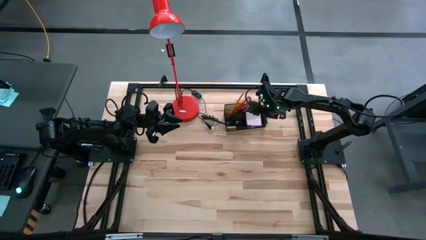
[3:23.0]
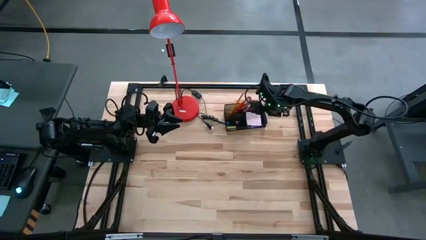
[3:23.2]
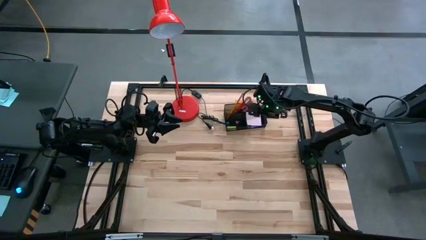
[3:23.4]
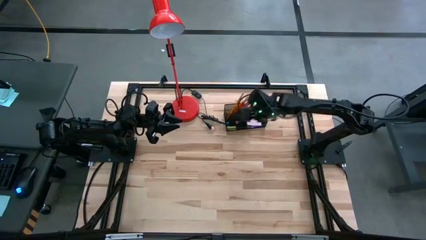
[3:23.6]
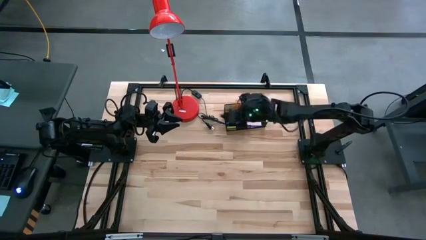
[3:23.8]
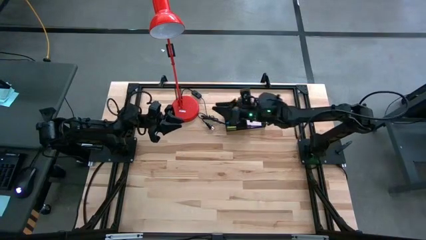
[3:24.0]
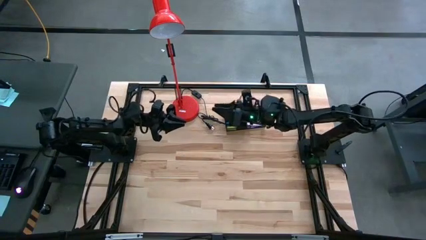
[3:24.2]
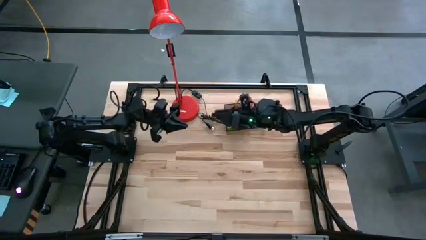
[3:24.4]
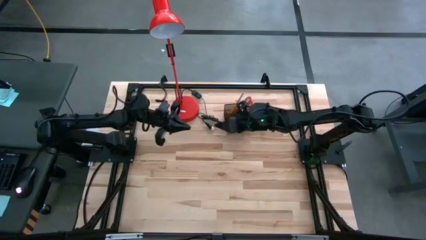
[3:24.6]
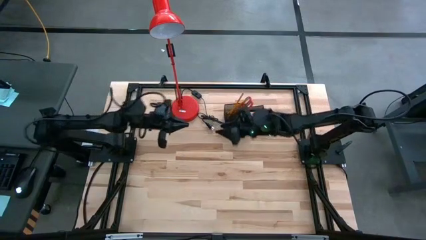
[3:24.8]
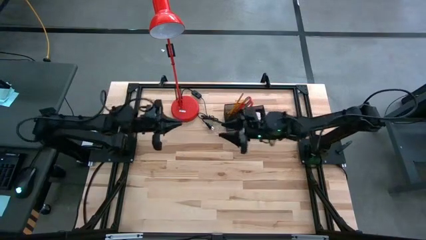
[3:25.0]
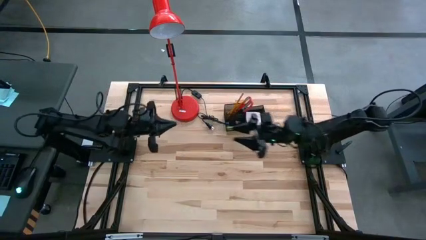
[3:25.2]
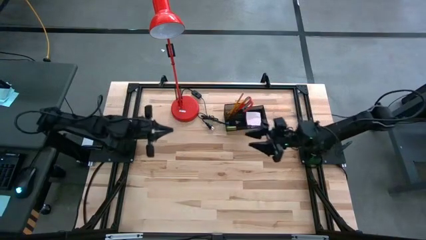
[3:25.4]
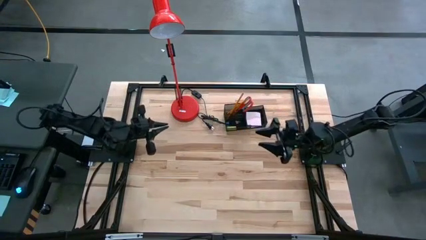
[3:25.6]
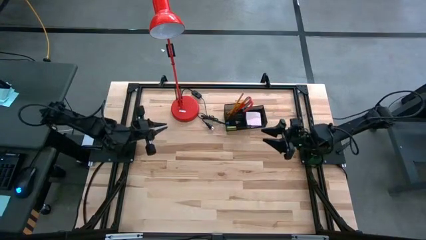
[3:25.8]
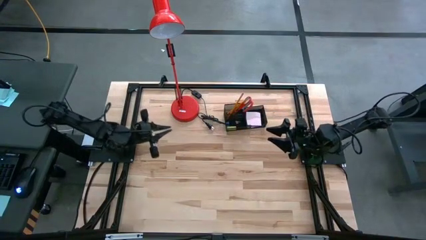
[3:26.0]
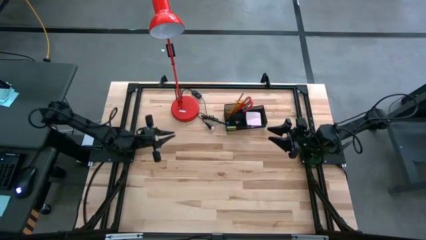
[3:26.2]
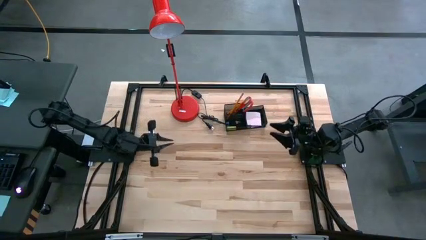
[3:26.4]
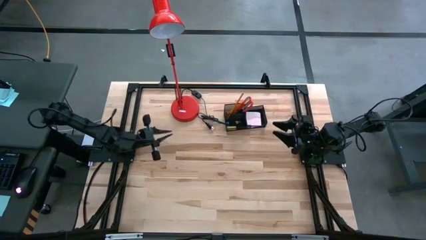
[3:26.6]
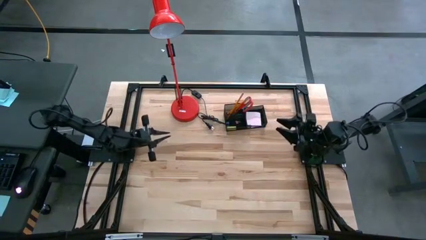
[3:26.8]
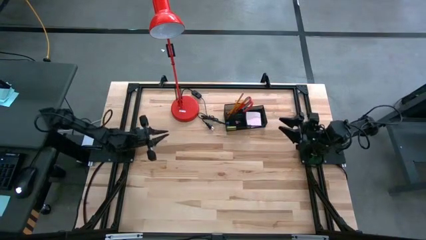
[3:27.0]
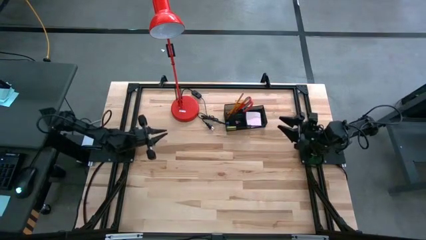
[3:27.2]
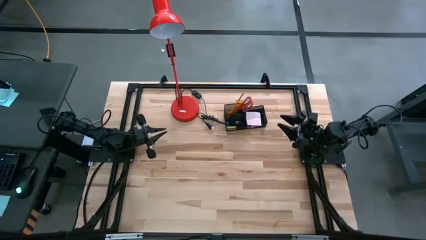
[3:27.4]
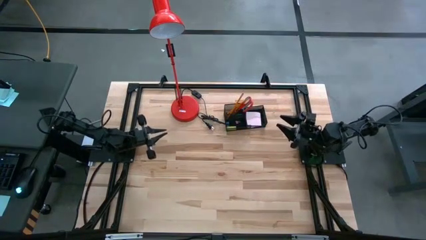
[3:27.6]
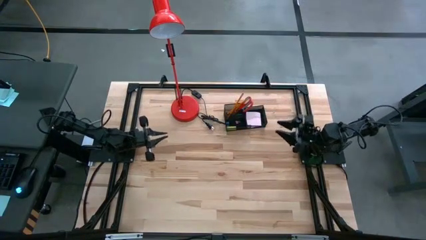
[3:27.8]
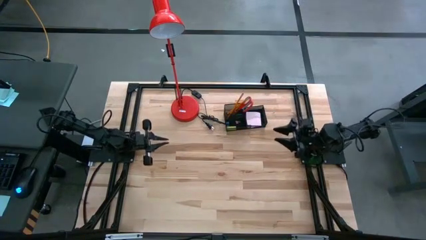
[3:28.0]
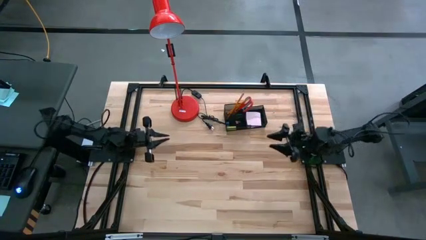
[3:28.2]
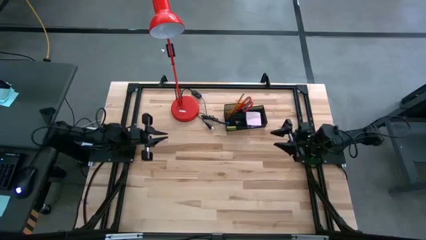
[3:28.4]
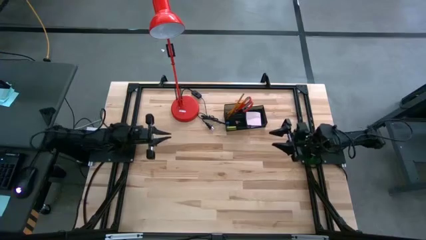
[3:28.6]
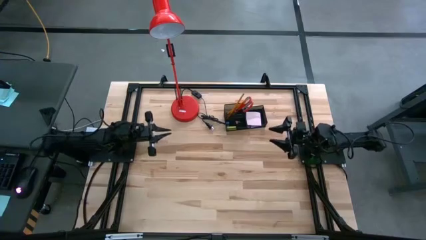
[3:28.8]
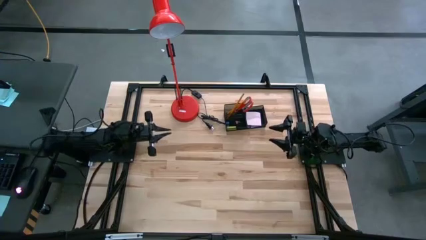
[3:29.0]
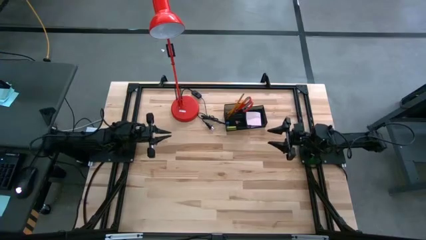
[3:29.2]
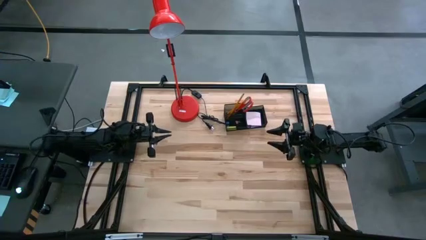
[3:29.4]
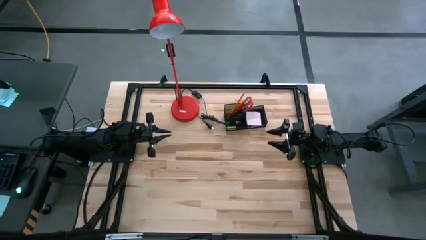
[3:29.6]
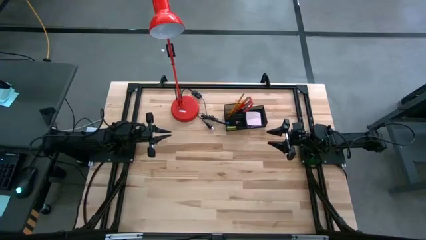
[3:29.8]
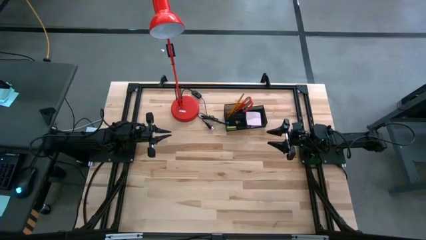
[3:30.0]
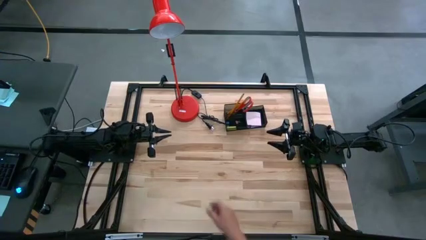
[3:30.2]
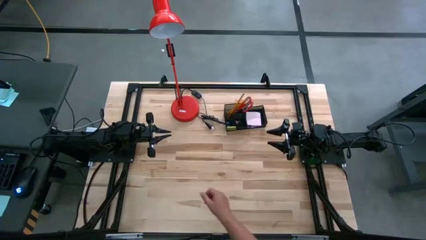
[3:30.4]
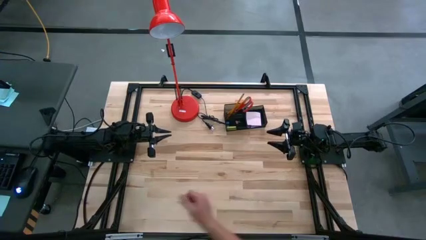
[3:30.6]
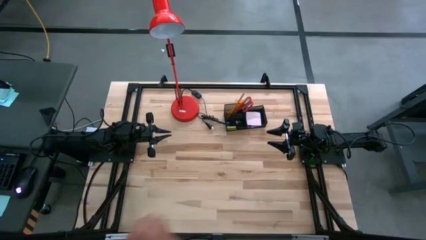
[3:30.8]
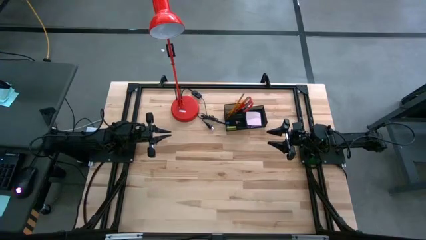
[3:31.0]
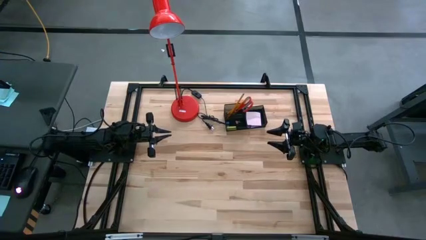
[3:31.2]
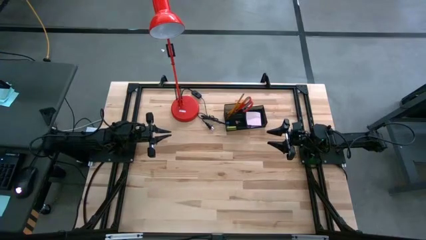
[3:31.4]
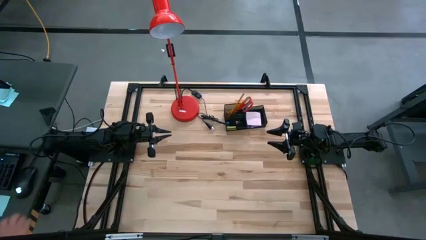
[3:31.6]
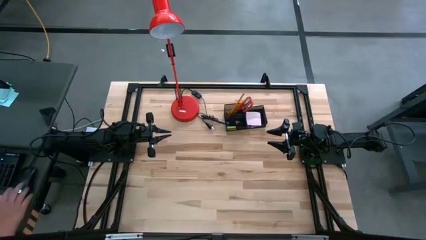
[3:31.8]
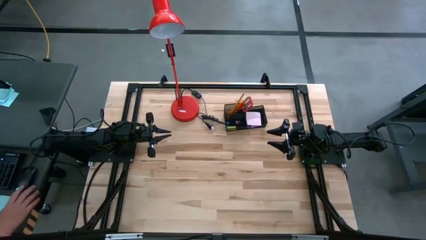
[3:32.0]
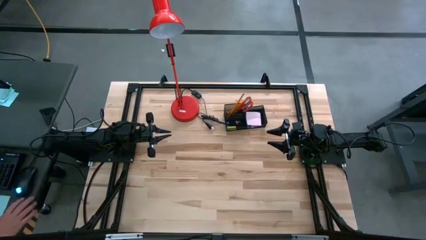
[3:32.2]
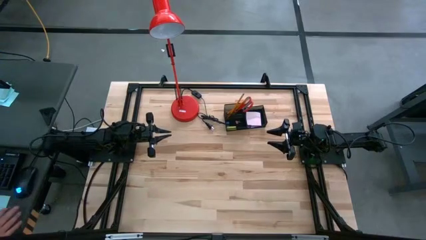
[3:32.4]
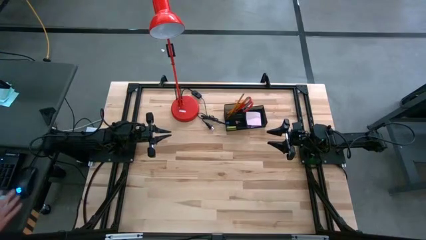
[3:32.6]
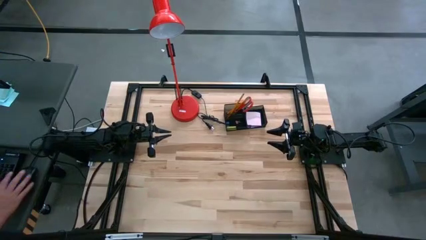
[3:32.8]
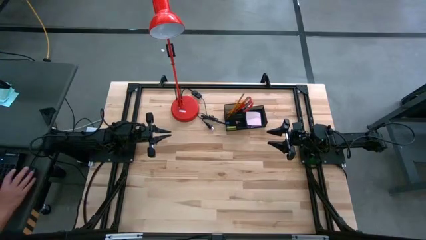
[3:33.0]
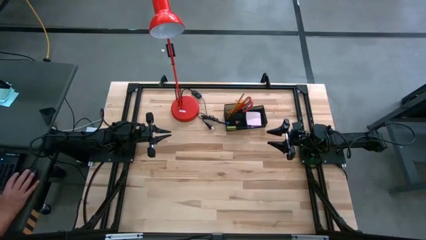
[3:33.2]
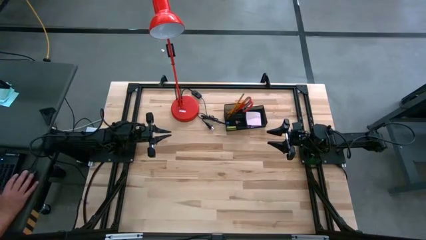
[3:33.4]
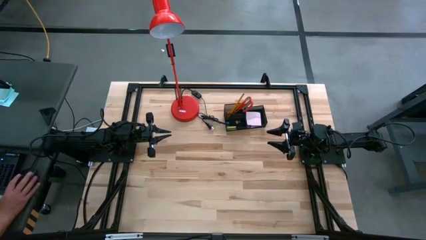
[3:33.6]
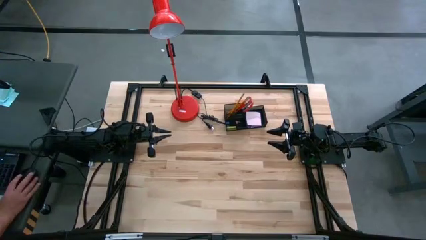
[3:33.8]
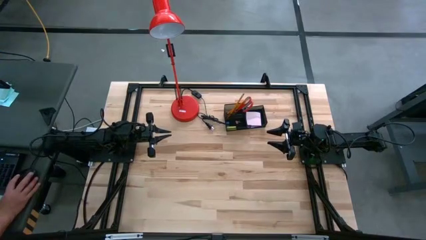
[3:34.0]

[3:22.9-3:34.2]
Task: Pick and place office supplies into organizer
Return to Home Position
